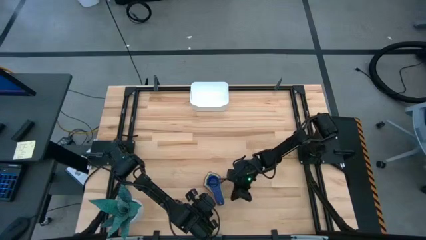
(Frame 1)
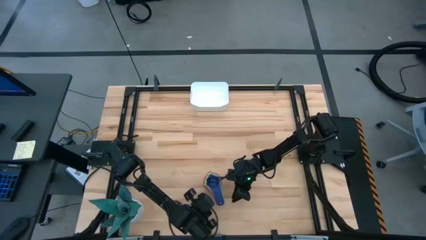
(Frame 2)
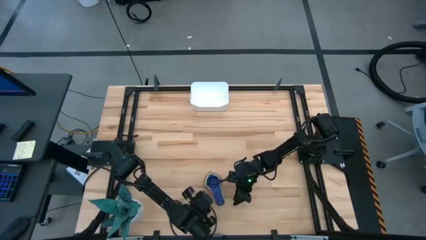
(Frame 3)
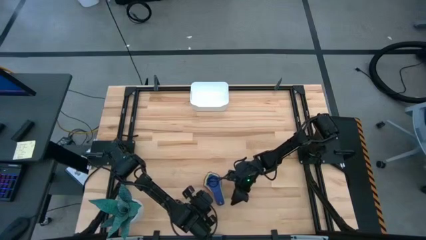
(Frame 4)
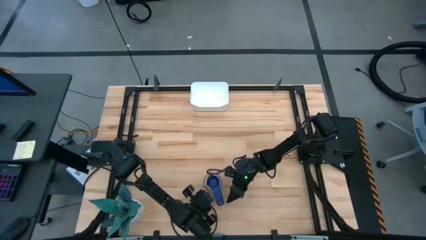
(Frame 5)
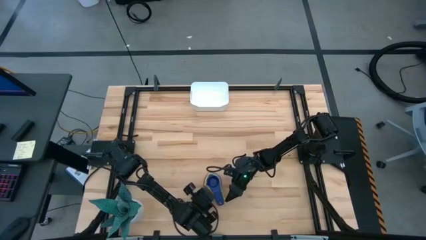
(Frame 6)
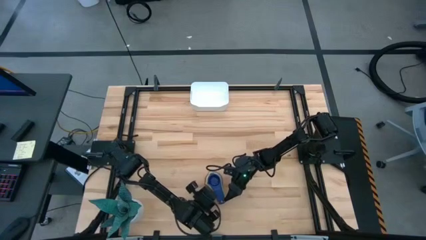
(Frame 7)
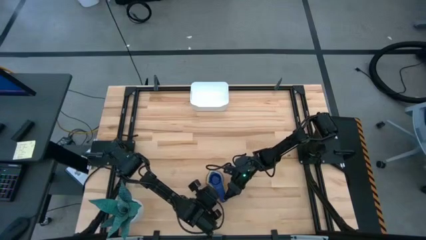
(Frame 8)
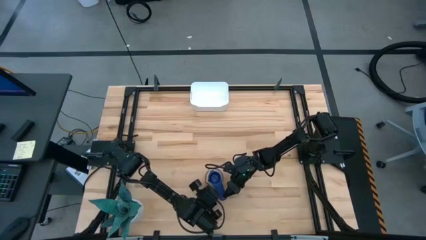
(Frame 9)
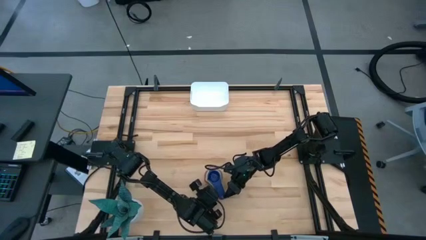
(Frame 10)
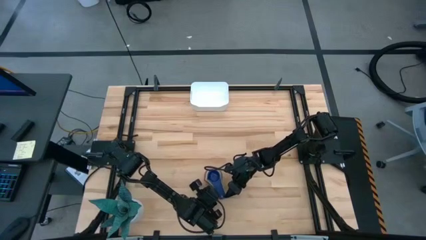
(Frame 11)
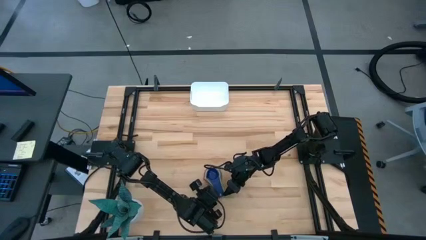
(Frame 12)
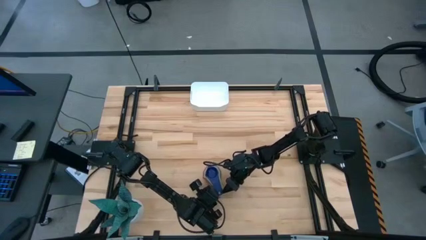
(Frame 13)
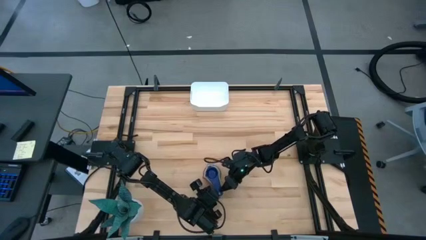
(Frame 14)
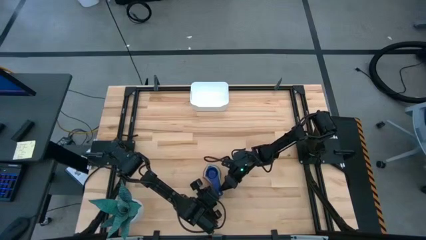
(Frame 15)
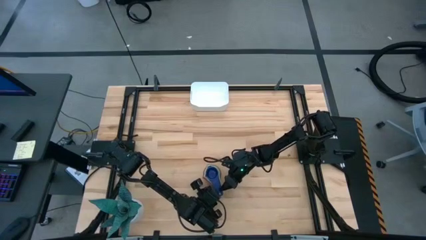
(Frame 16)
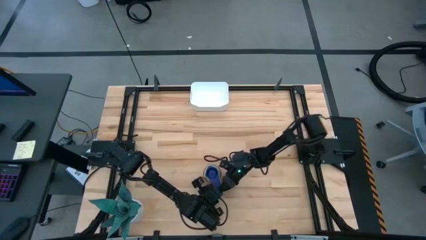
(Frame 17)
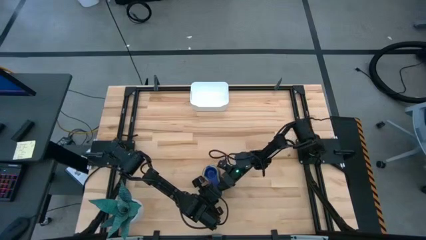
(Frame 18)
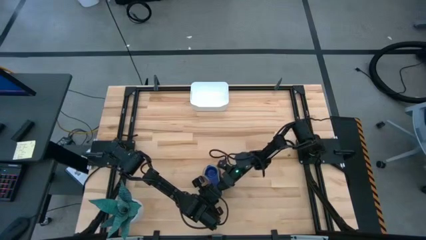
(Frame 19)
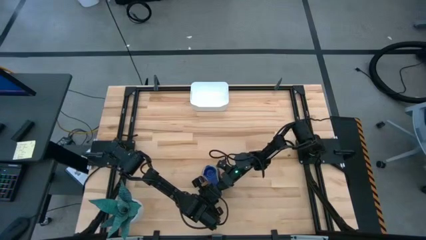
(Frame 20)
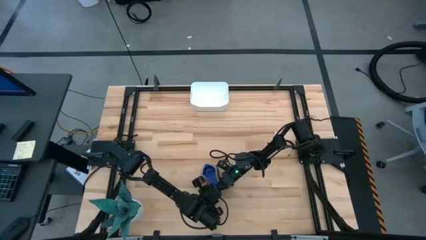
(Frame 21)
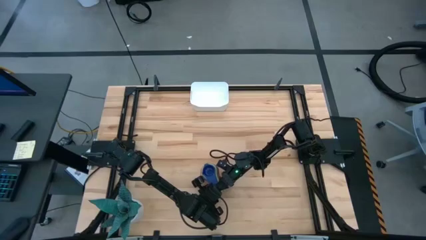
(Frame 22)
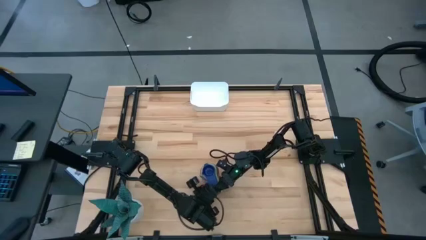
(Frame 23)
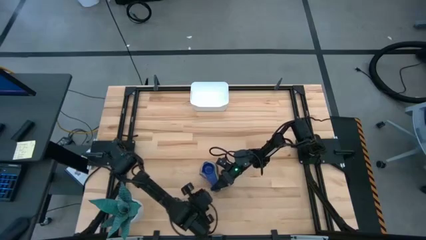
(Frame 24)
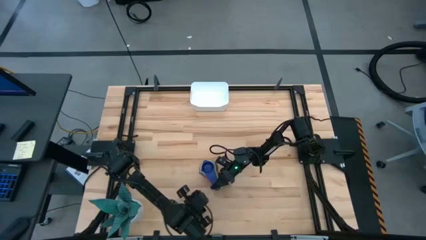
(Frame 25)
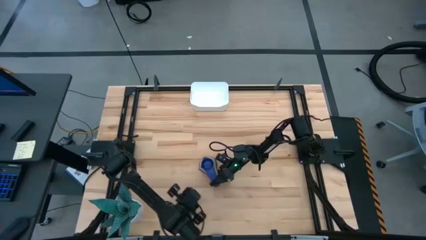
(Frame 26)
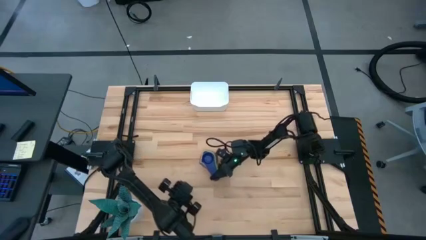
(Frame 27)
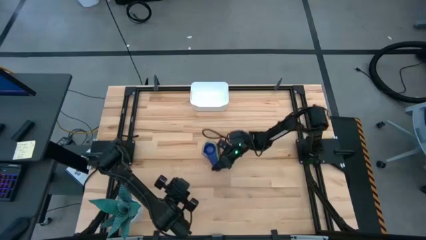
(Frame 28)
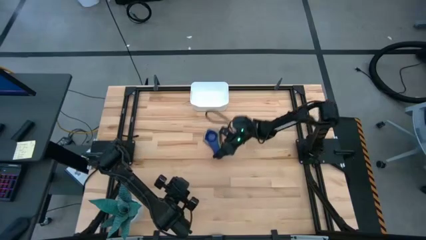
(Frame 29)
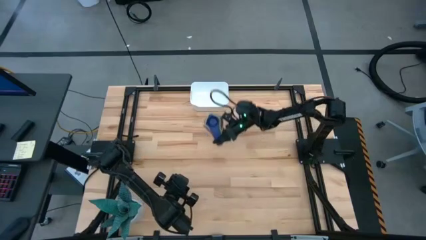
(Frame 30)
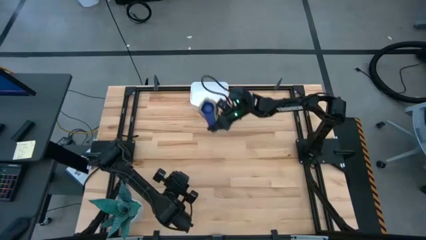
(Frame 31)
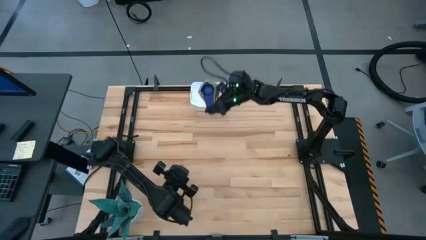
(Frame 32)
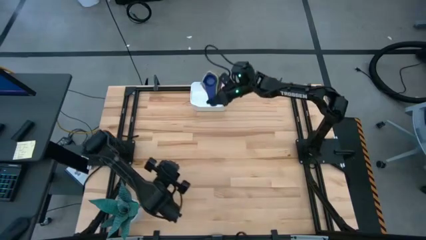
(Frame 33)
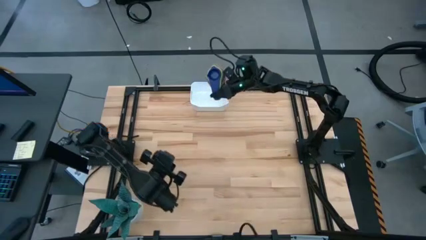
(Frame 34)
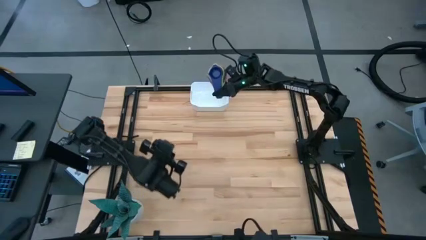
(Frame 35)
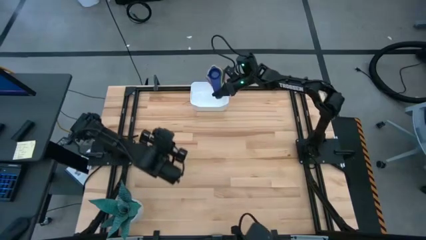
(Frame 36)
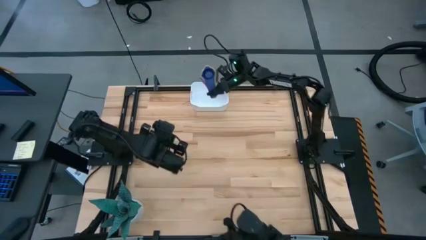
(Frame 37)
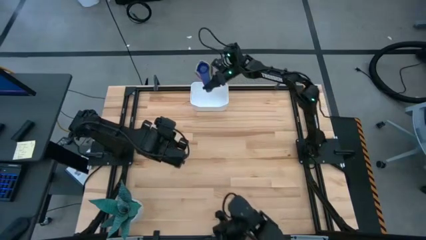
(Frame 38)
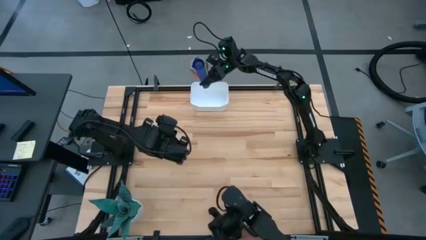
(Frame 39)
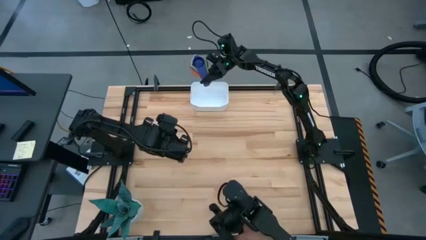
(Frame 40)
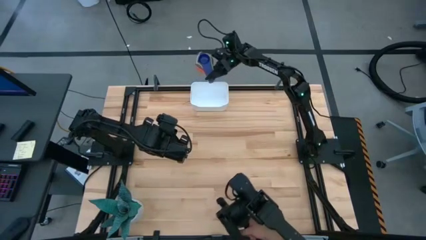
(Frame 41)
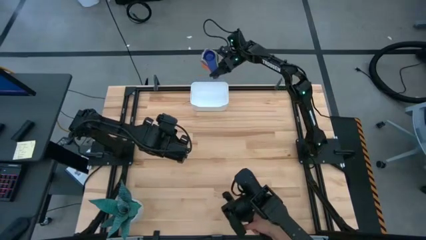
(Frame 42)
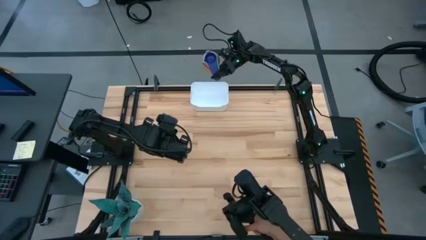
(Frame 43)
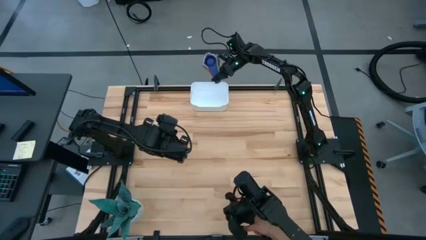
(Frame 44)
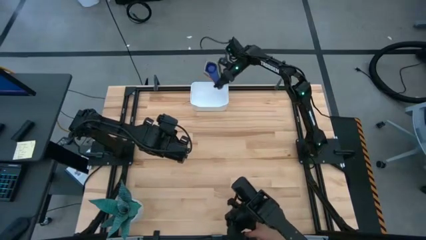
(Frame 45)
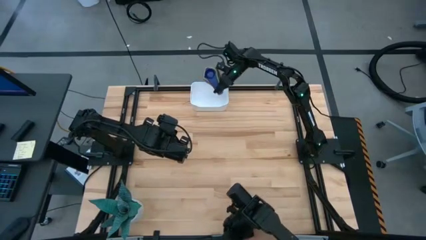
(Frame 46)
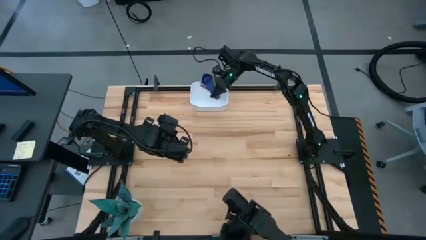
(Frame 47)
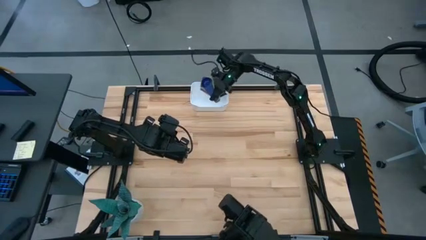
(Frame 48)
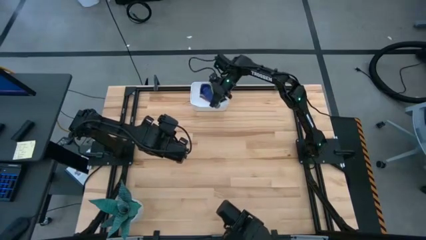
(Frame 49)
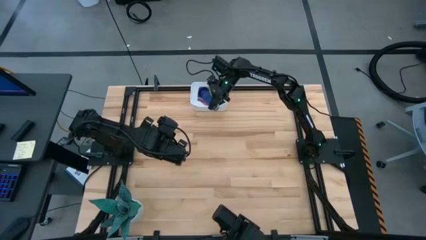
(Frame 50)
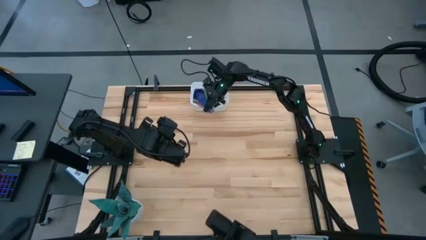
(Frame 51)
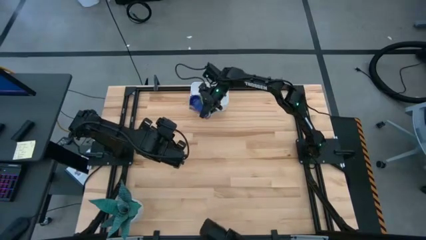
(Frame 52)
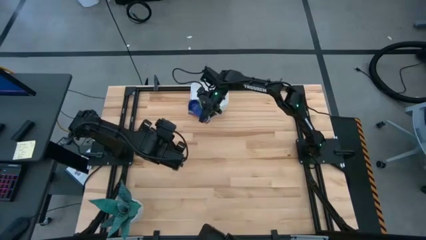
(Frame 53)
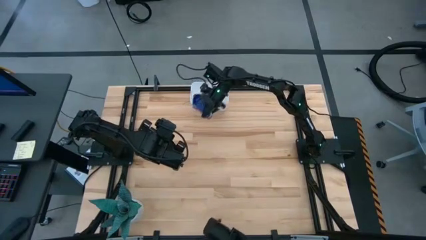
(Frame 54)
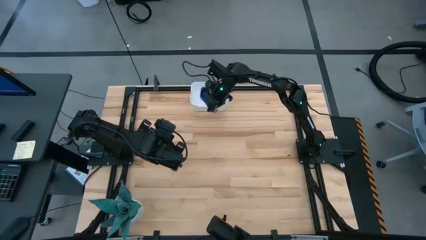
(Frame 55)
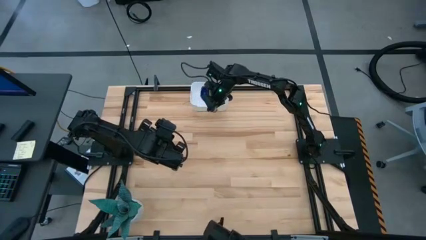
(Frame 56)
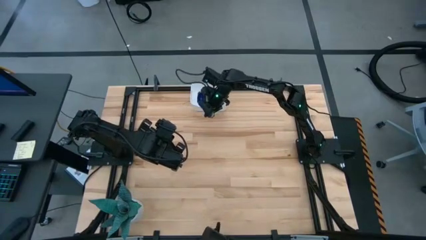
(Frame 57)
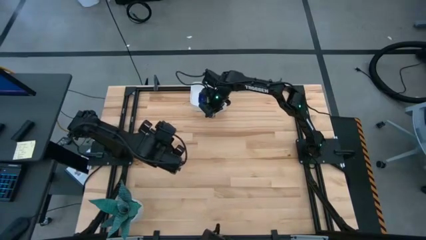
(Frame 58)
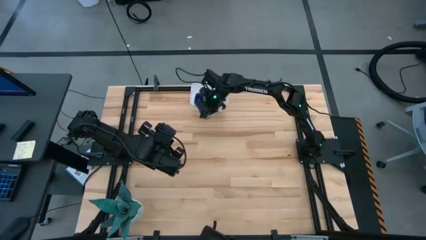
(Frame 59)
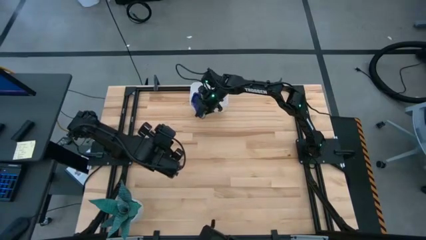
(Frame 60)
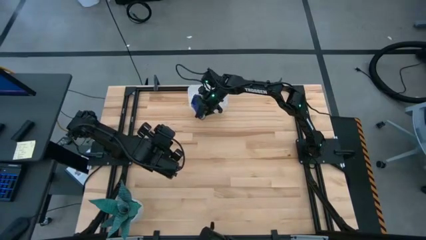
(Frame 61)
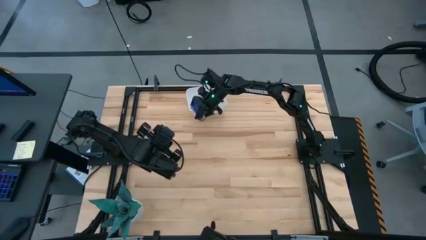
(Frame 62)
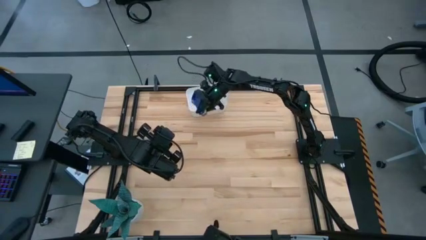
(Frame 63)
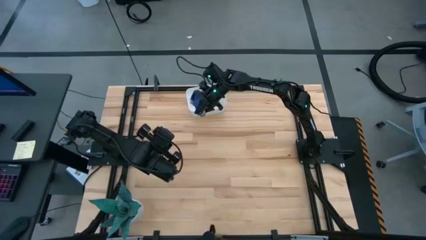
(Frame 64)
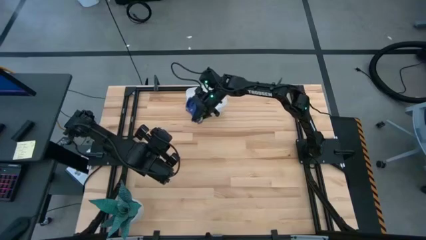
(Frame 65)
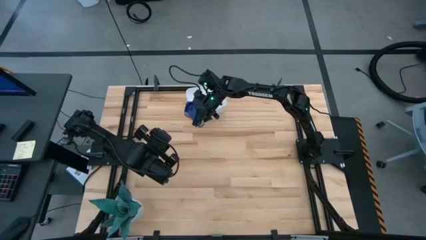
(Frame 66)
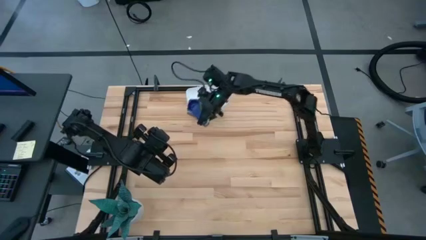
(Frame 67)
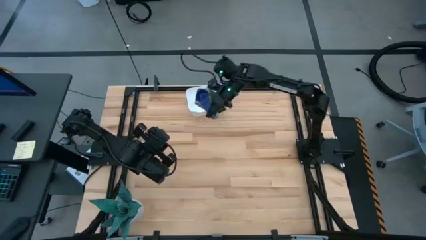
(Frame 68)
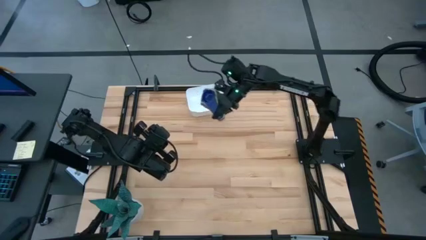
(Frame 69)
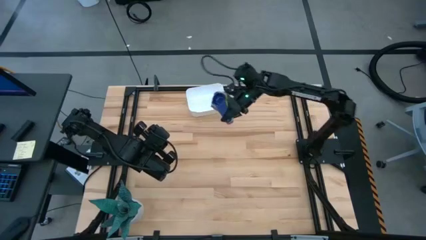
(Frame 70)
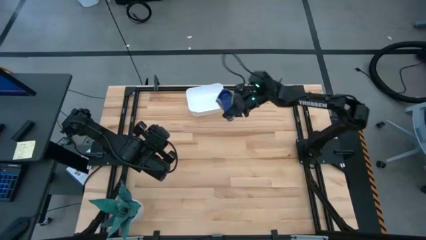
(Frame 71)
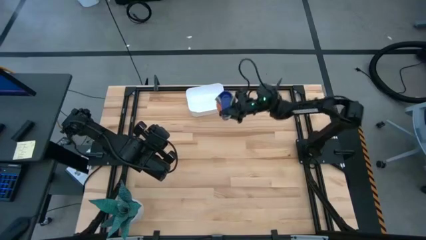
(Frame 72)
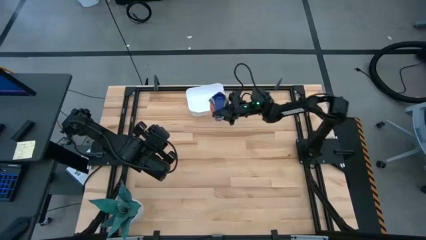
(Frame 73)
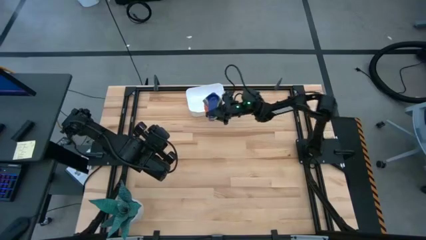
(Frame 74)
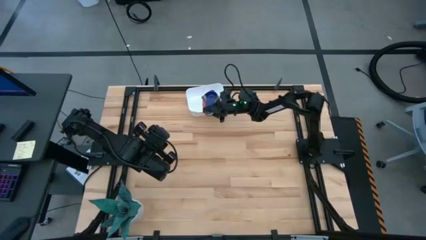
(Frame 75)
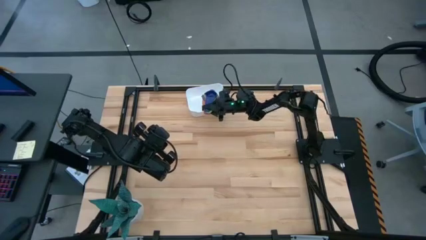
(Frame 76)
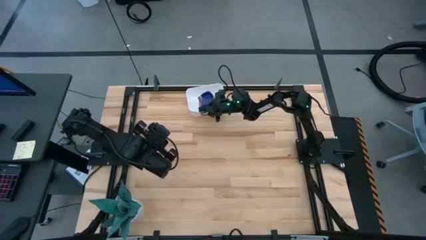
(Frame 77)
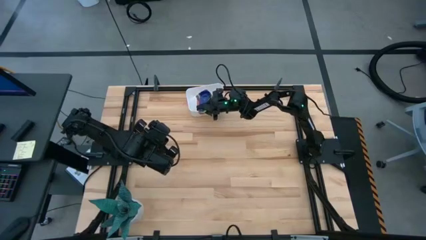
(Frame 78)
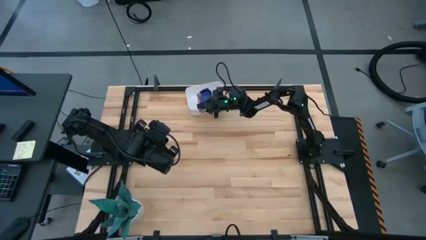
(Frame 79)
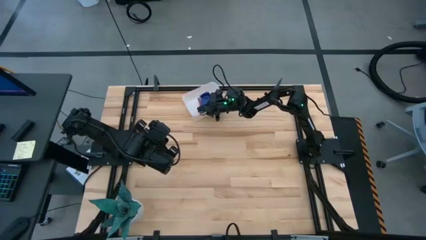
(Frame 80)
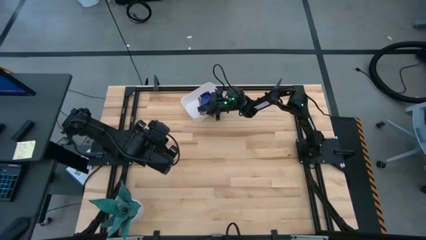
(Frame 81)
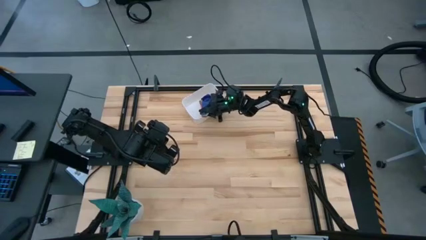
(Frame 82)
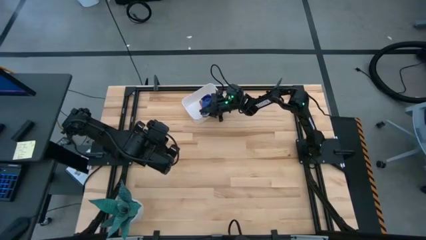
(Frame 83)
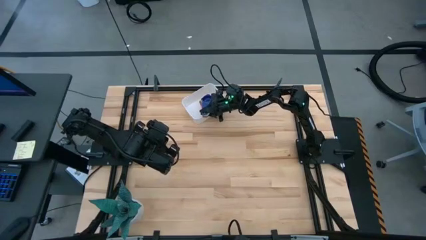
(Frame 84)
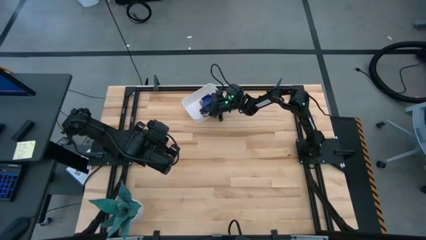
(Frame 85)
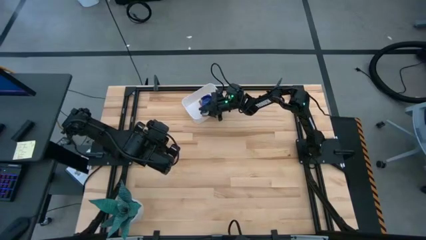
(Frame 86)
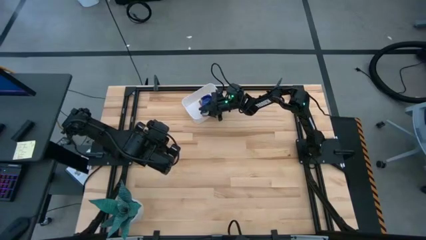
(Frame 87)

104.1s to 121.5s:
Task: Nest measuring cups in basket
Put the stacked measuring cups into the white bin
